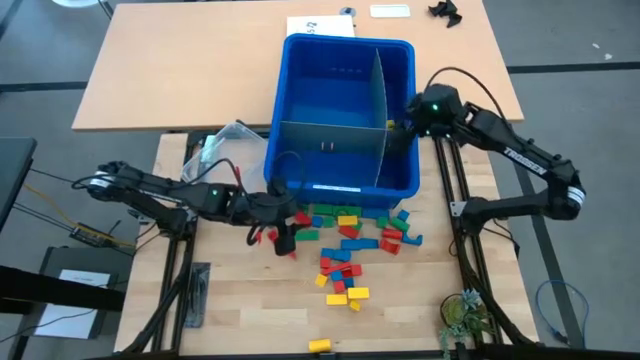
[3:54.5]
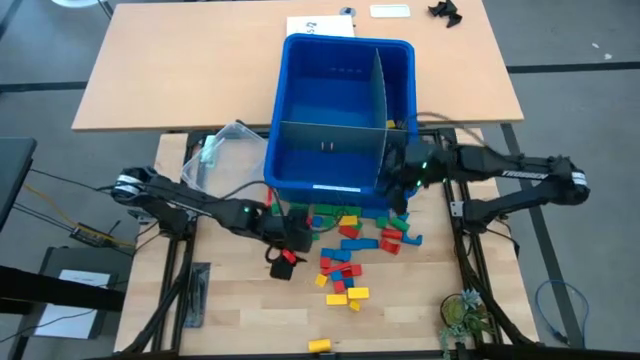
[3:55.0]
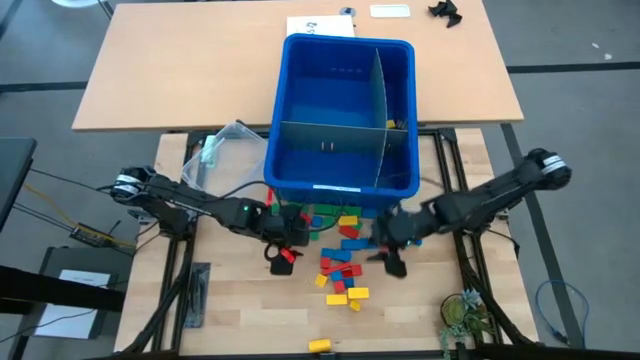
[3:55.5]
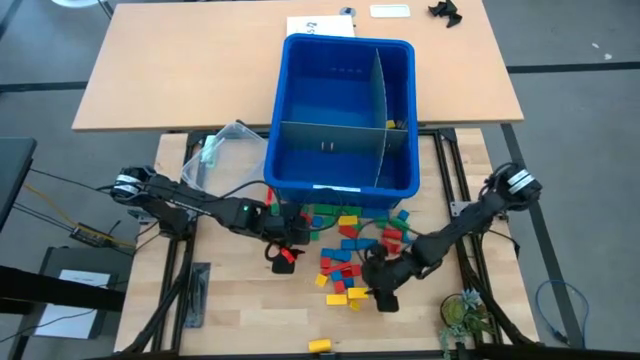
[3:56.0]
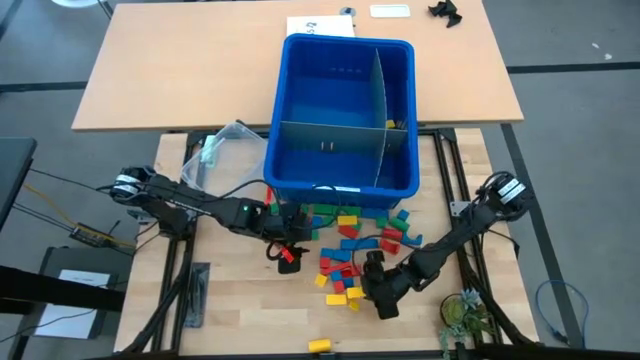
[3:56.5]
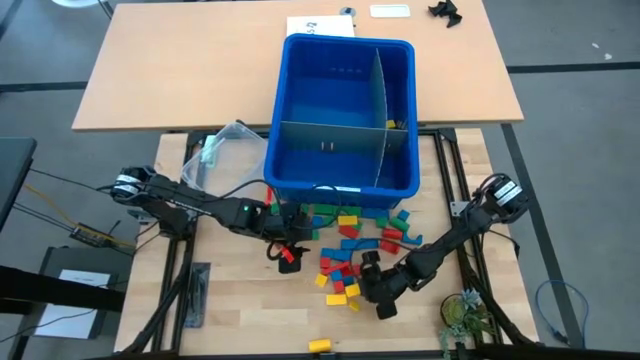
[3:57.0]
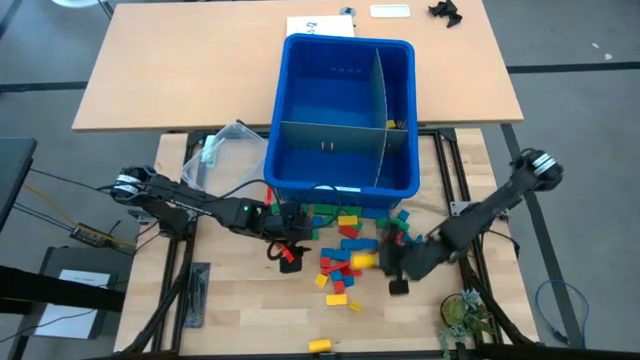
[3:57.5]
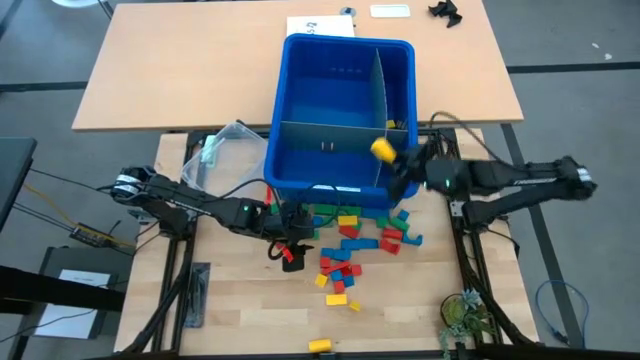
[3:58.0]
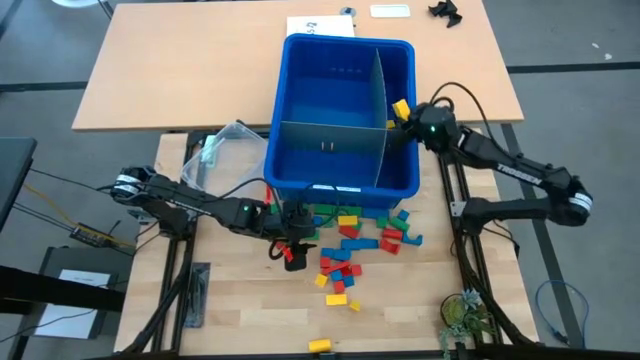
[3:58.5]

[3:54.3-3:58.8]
Task: Sort blocks
Put the yellow block into the blue bin

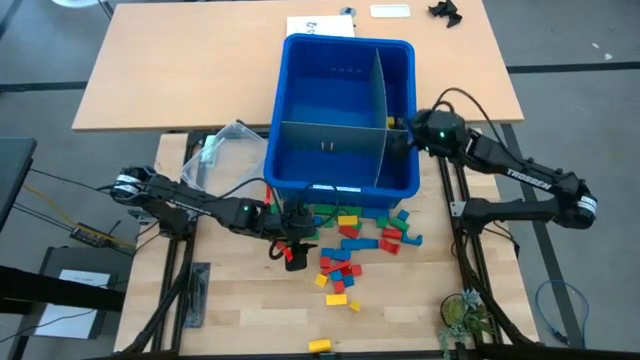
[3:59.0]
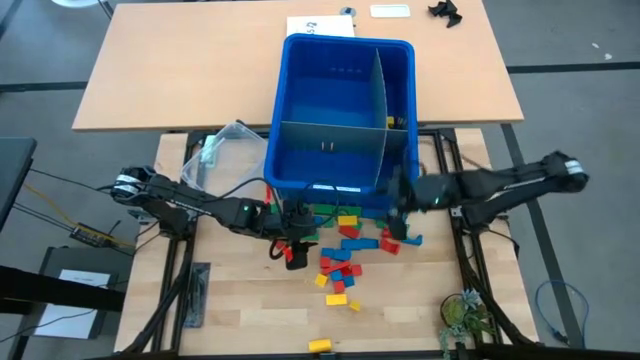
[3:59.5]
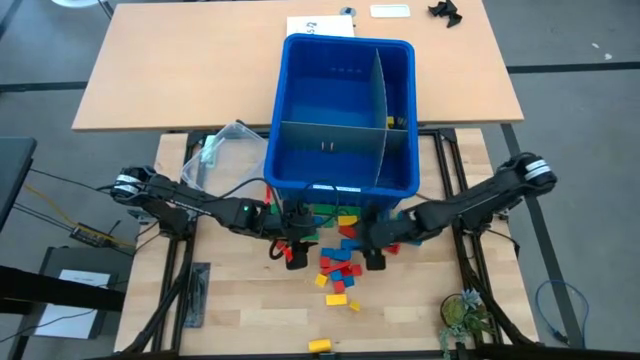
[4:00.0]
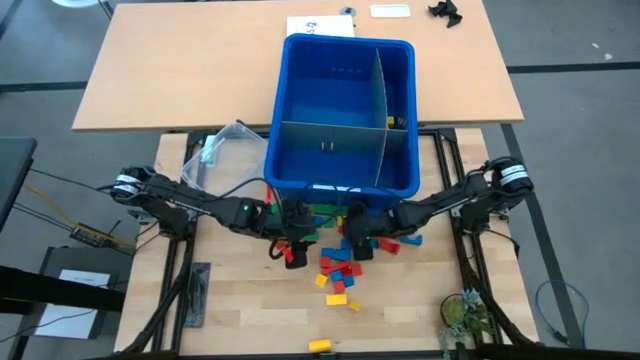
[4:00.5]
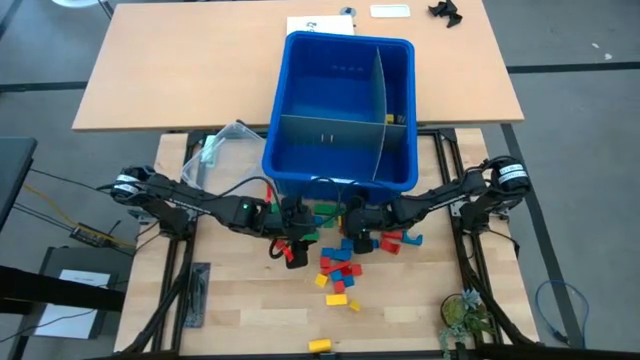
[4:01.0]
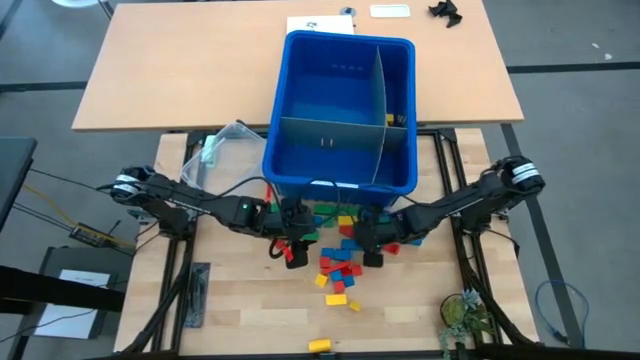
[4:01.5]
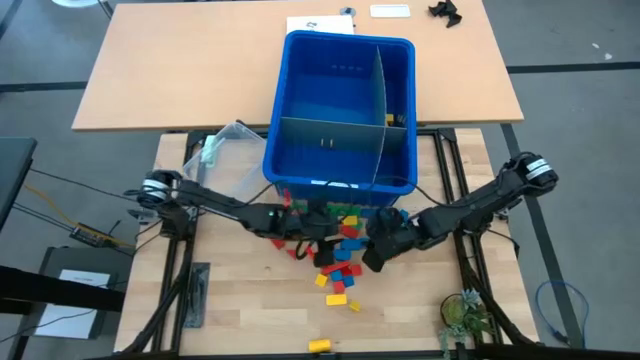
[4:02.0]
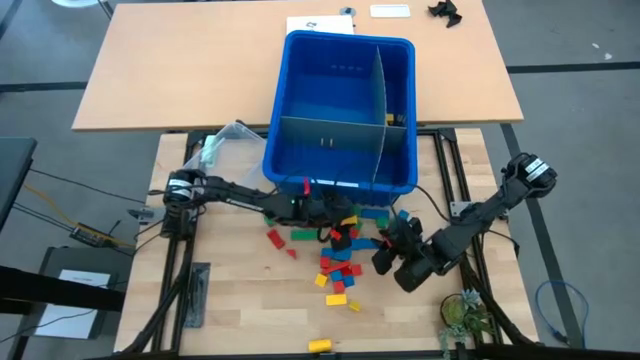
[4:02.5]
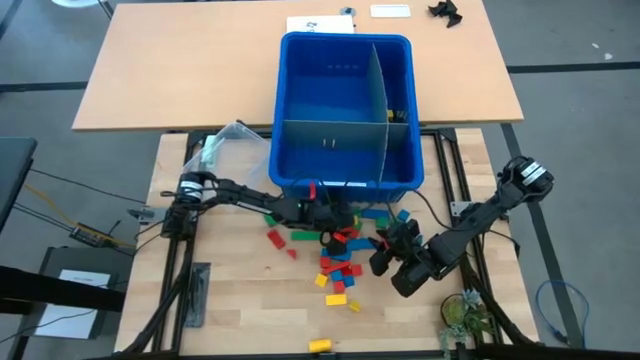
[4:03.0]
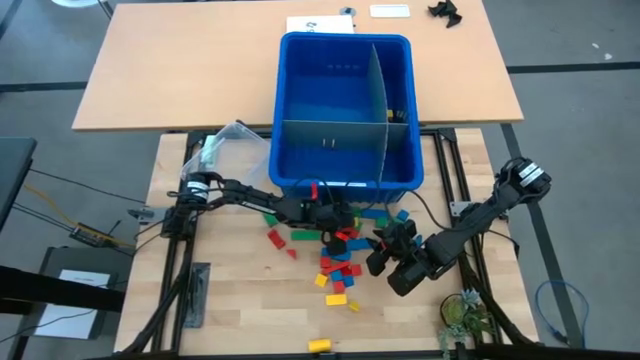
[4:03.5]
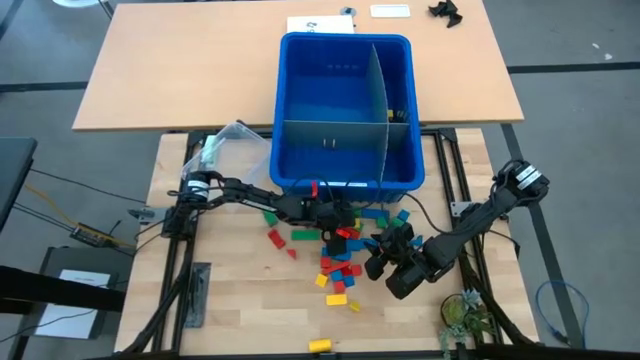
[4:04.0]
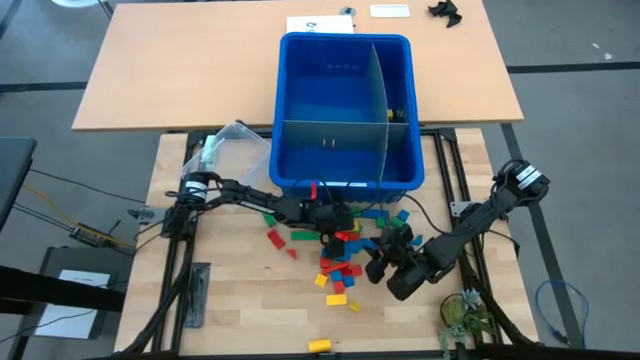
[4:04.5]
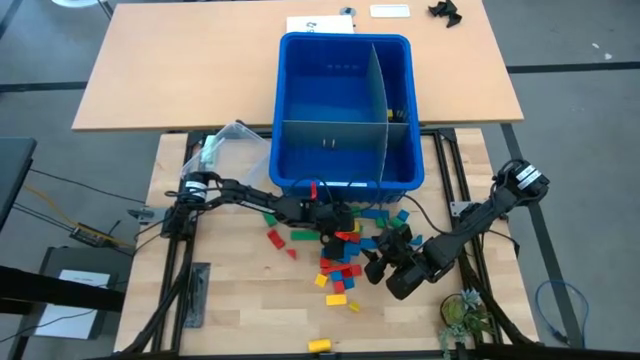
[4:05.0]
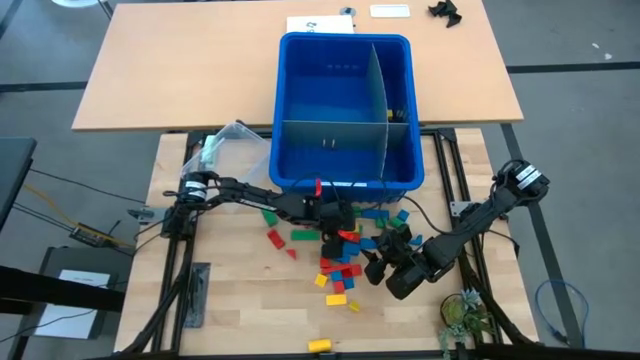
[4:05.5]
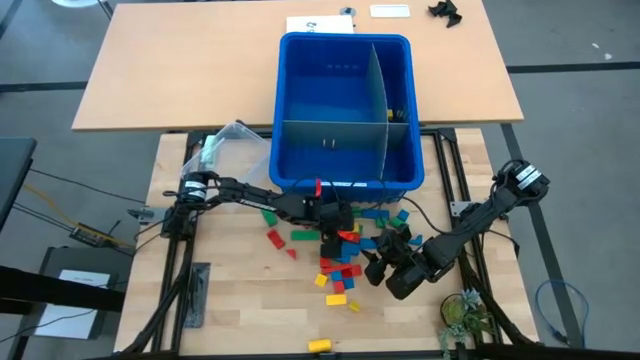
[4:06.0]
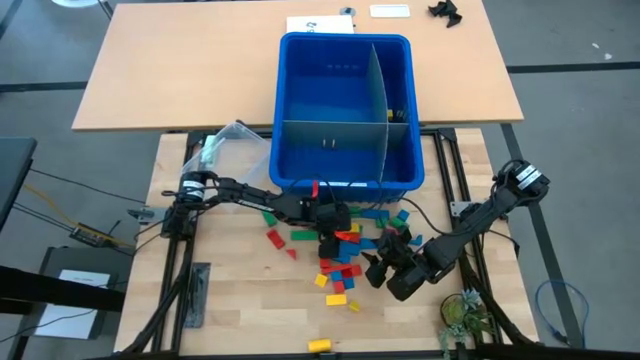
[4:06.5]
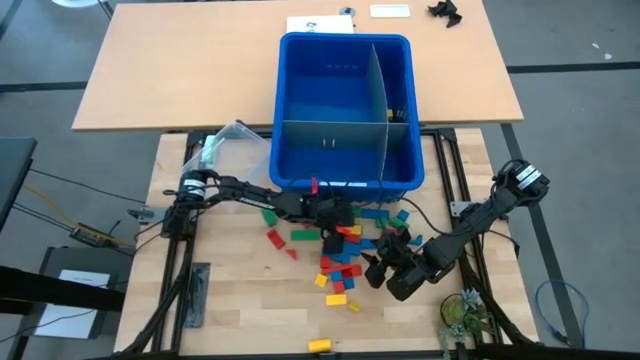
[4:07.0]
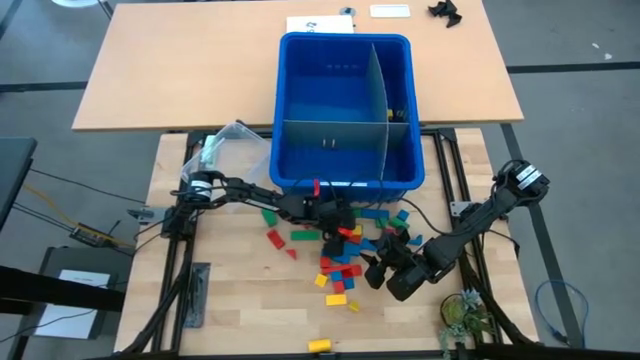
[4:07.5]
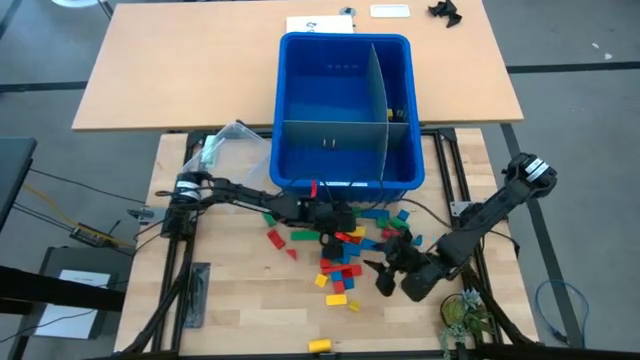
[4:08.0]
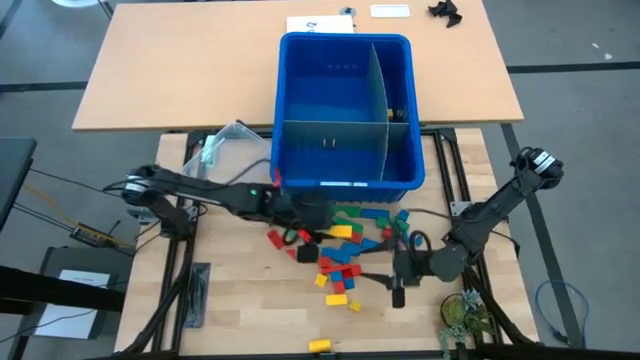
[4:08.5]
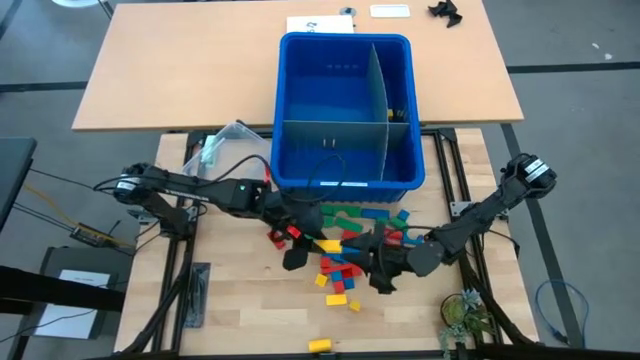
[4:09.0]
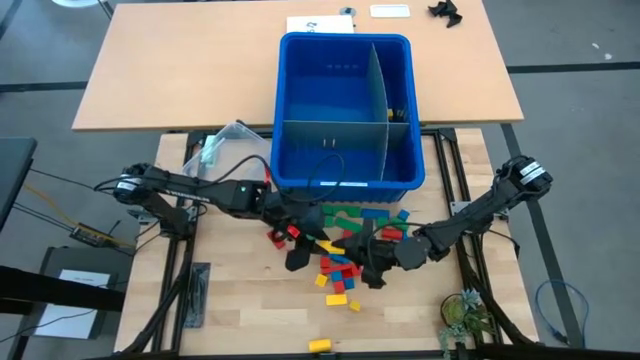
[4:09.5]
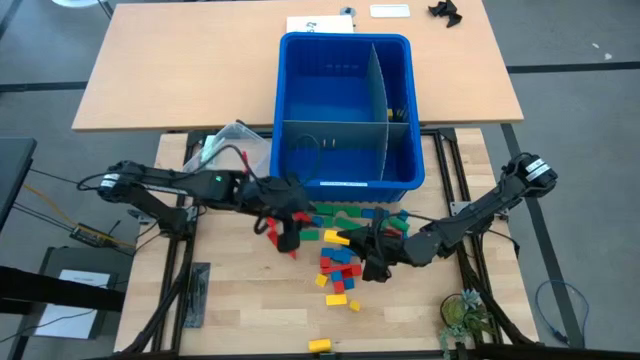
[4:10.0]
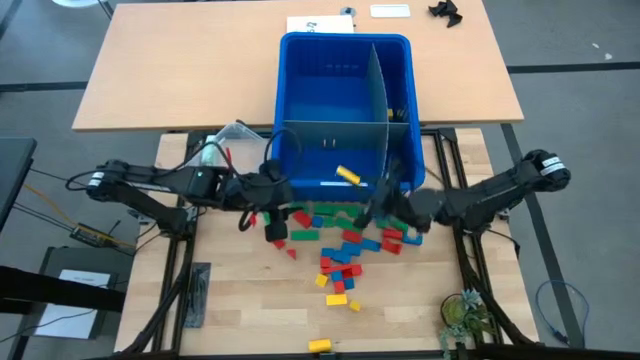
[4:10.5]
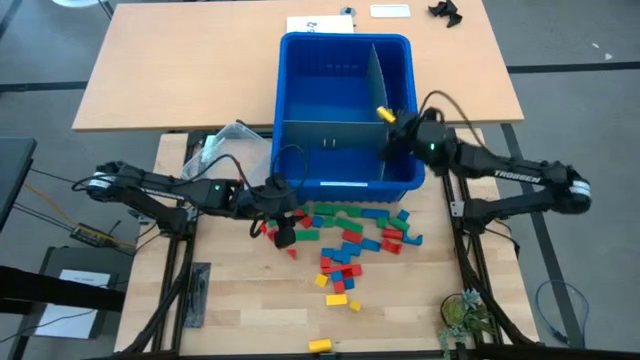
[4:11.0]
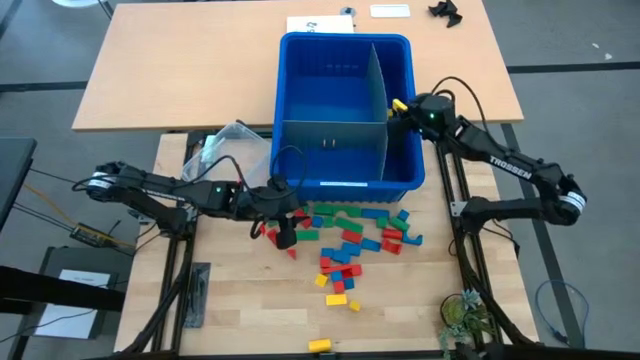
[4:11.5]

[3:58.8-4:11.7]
Put the yellow block into the blue bin

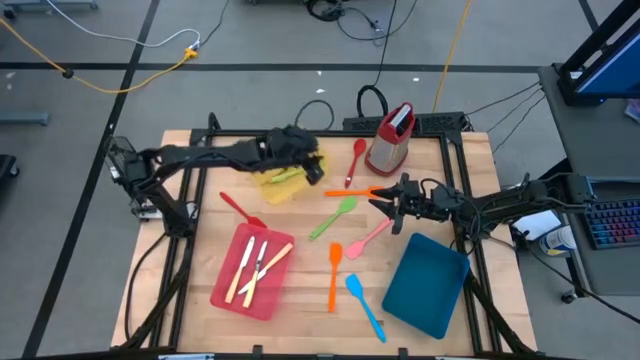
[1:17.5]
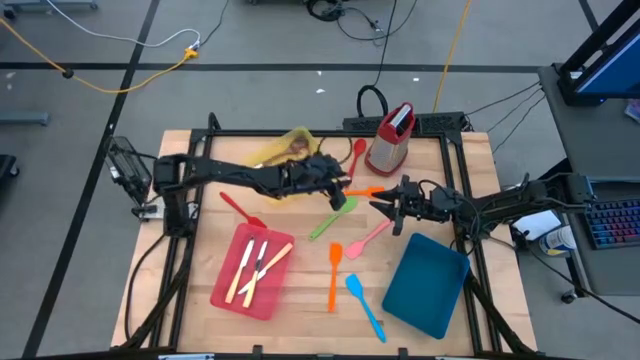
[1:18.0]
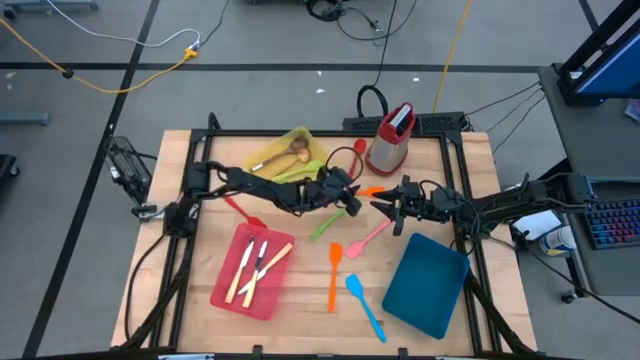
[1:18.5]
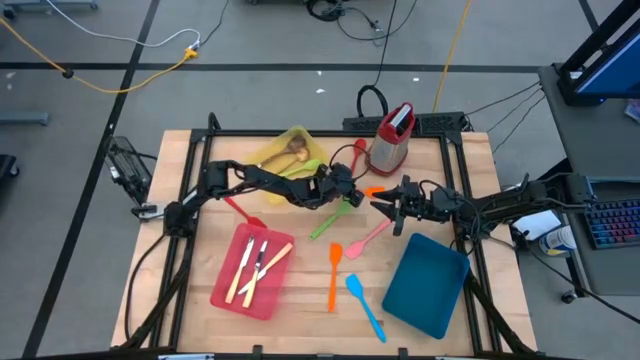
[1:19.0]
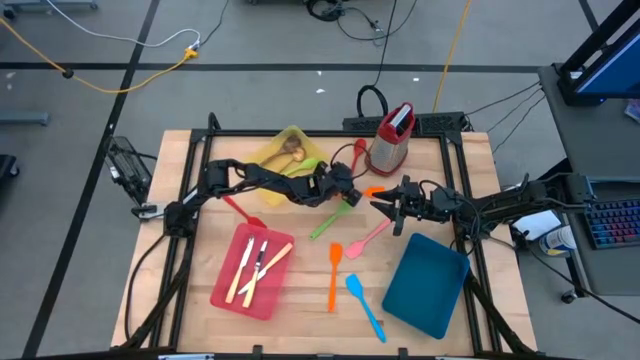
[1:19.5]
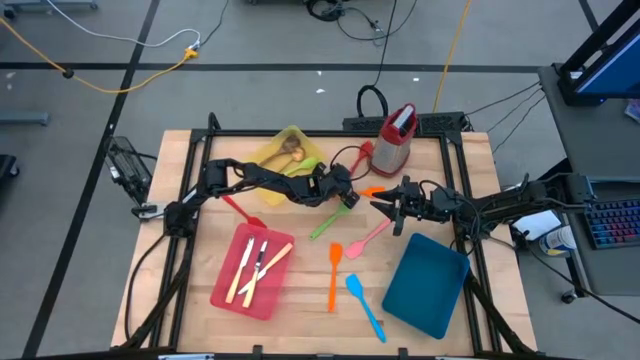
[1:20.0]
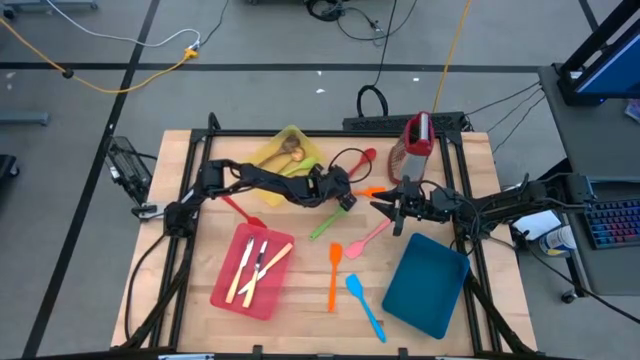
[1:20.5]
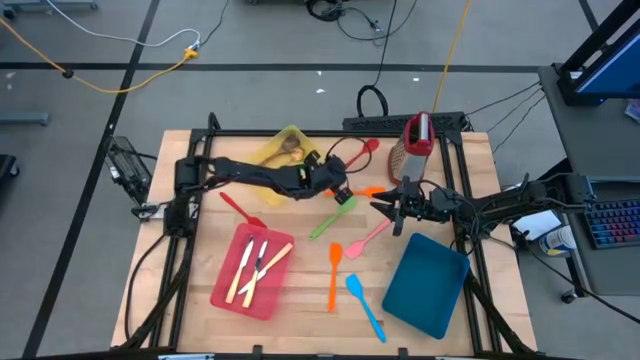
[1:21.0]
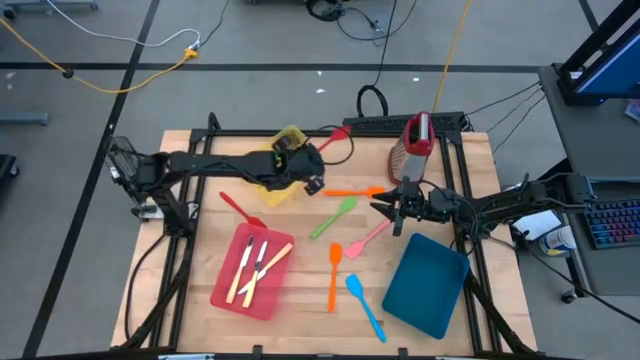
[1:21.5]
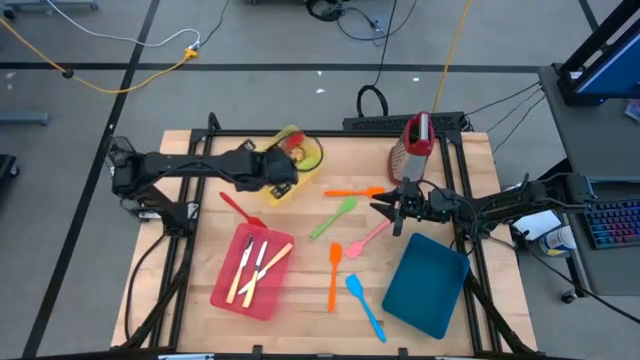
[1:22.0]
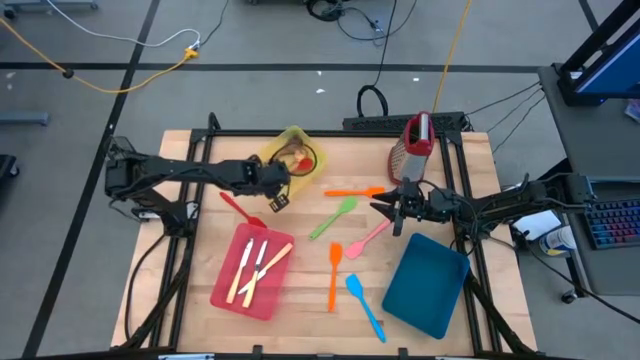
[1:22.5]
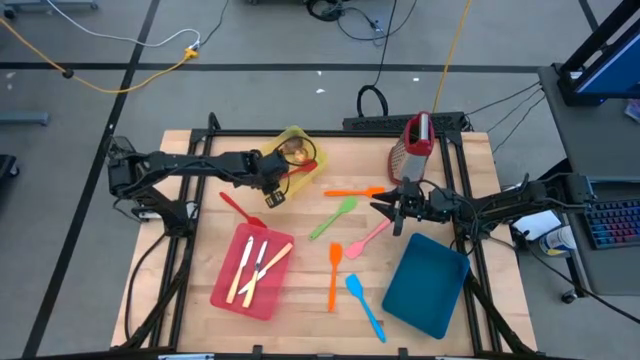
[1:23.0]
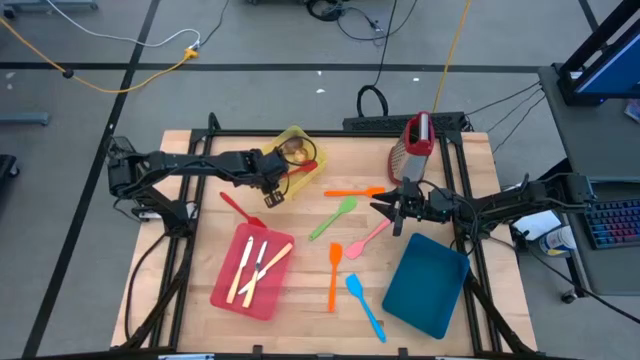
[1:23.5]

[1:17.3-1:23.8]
Task: Pick & Place Kitchen Items
Put the red serving spoon into the yellow bin
